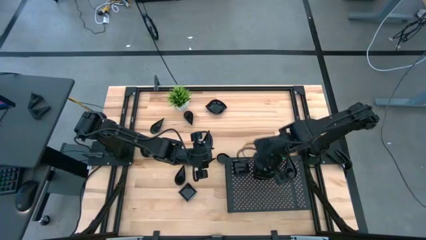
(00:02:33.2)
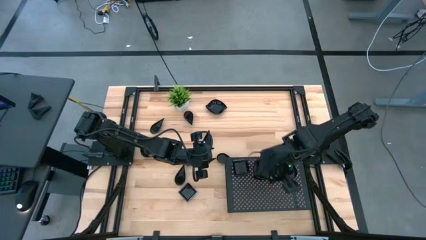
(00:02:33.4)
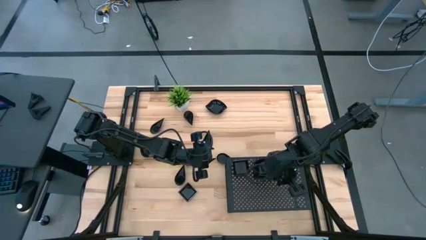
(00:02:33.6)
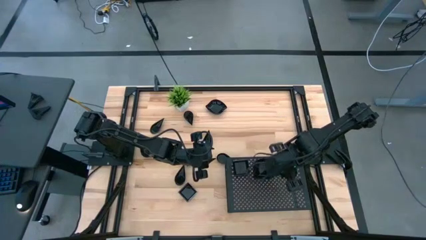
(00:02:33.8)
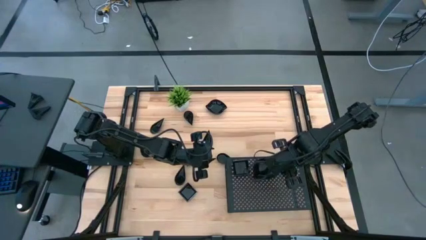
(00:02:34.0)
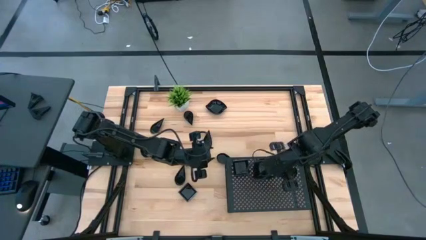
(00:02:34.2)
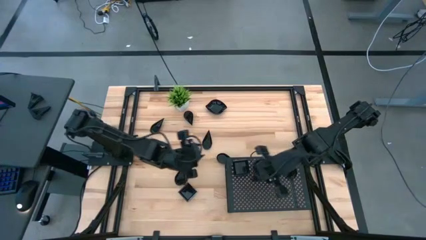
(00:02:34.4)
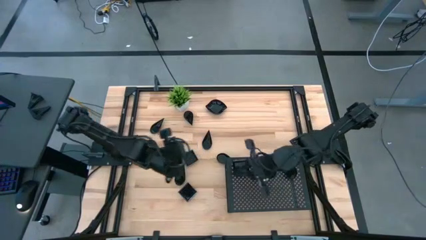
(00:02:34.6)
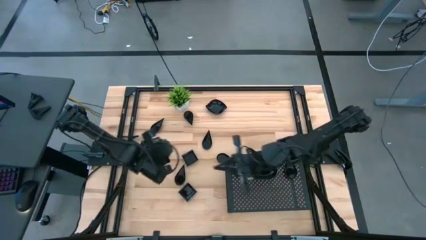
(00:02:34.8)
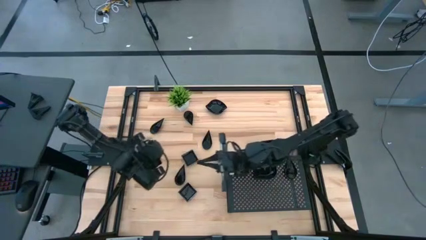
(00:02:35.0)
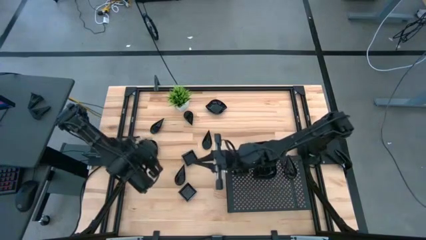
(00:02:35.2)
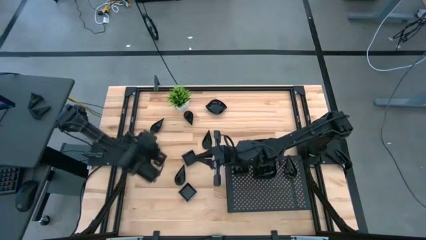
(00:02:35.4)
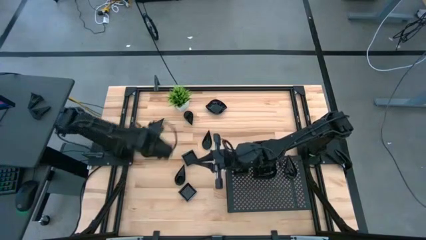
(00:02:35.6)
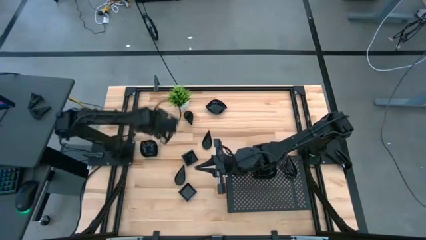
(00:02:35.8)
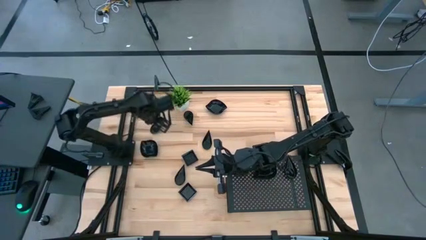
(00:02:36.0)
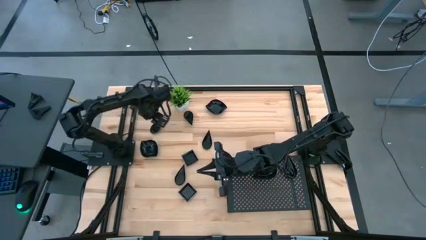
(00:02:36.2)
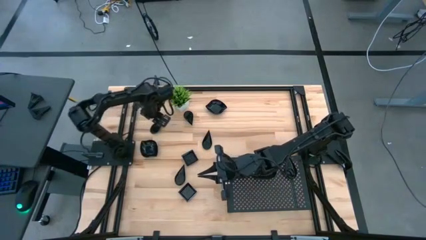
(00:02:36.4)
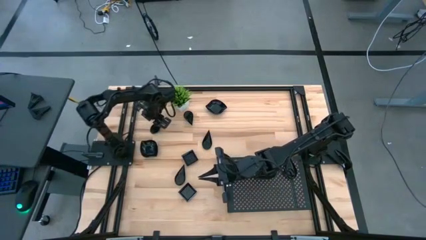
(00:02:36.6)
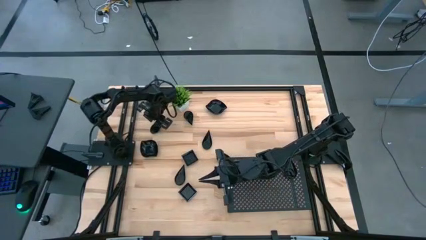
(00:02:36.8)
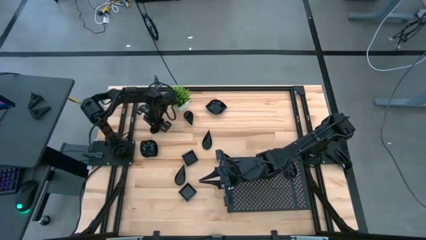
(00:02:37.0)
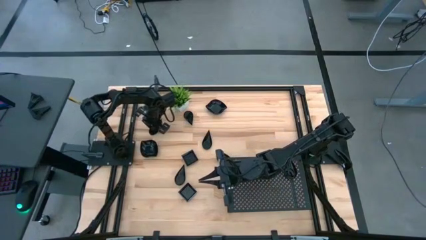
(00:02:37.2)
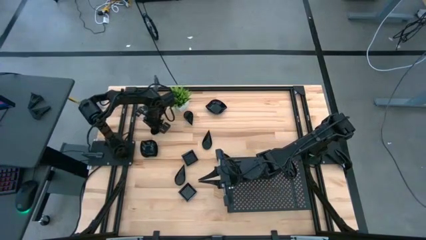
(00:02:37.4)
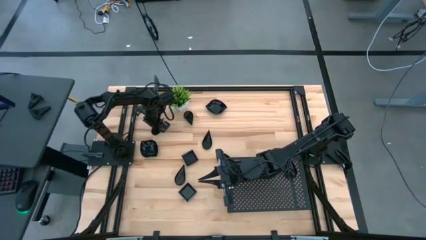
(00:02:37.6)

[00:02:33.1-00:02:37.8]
Task: Pick & Place Mini shaped plates
Stack the drop shaped plate on top of the drop shaped plate on the shelf

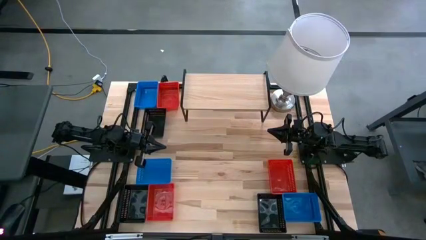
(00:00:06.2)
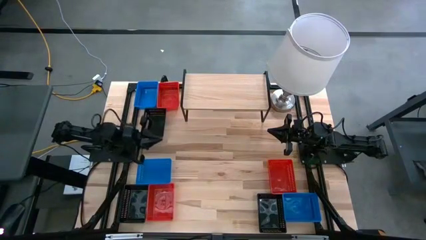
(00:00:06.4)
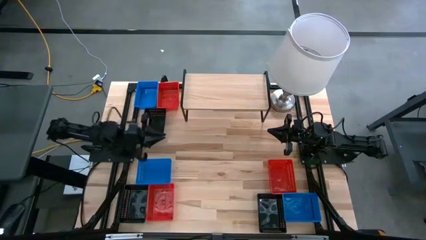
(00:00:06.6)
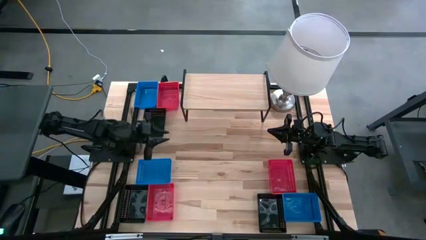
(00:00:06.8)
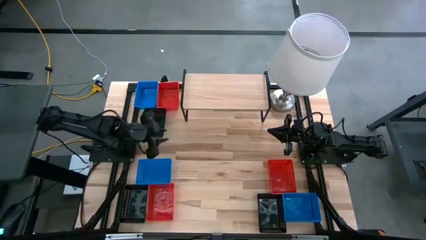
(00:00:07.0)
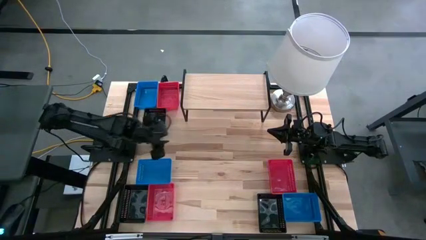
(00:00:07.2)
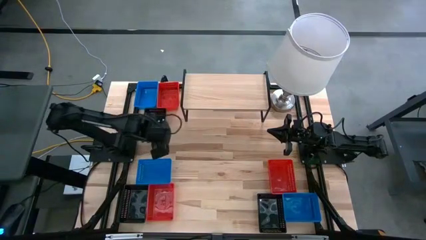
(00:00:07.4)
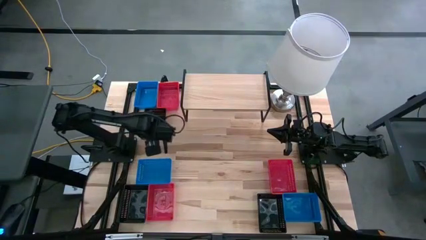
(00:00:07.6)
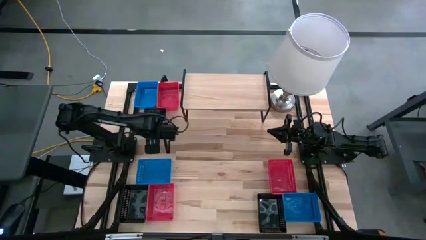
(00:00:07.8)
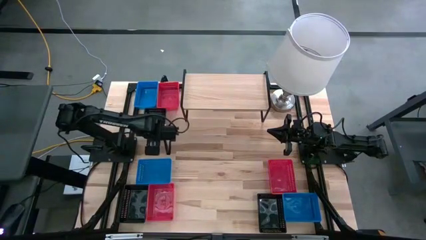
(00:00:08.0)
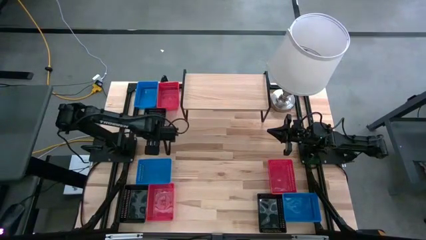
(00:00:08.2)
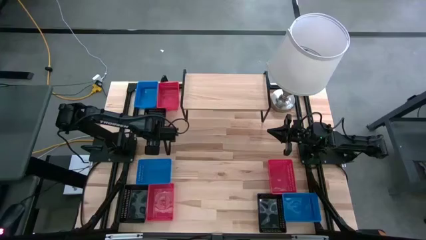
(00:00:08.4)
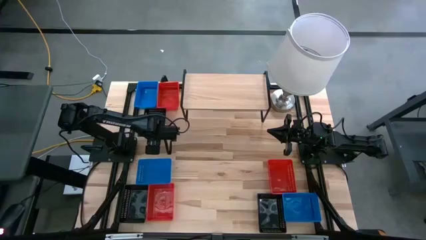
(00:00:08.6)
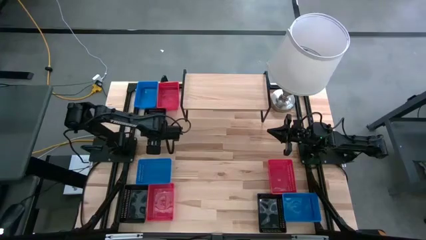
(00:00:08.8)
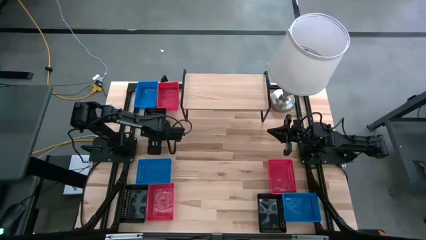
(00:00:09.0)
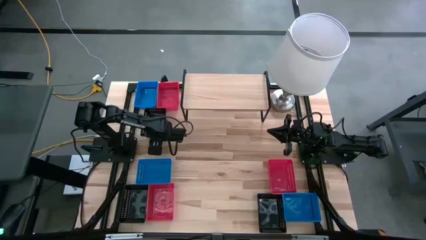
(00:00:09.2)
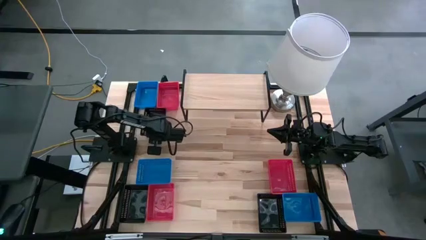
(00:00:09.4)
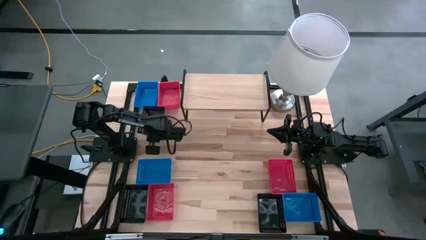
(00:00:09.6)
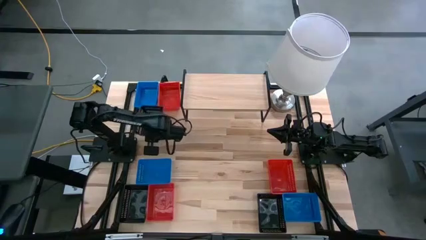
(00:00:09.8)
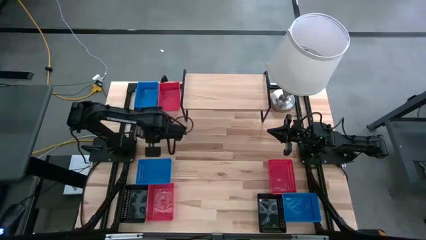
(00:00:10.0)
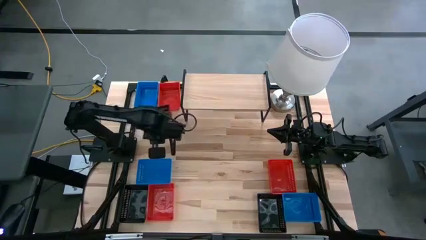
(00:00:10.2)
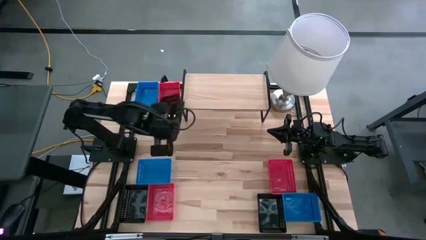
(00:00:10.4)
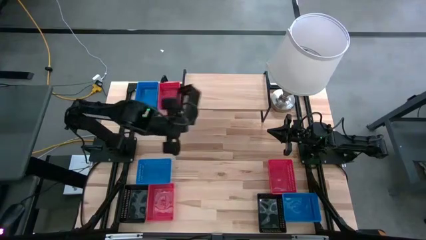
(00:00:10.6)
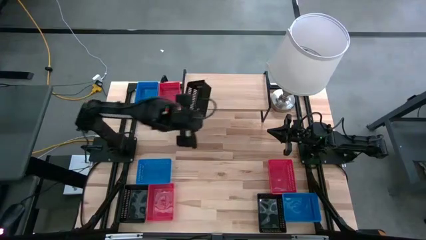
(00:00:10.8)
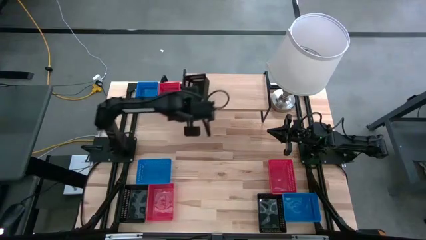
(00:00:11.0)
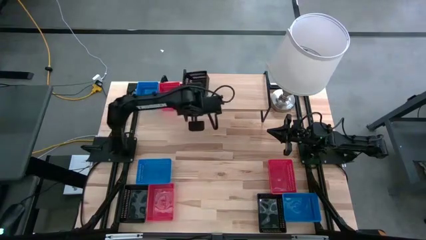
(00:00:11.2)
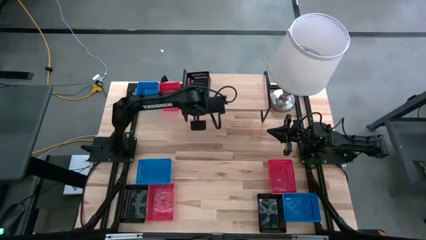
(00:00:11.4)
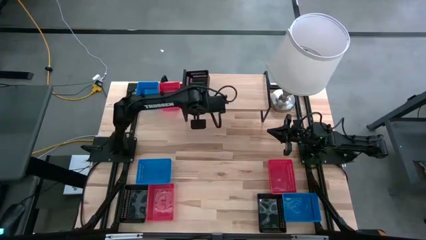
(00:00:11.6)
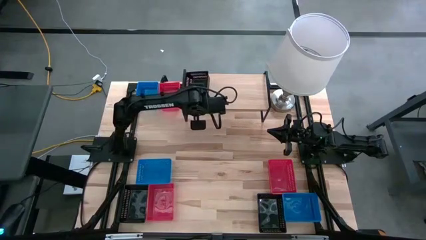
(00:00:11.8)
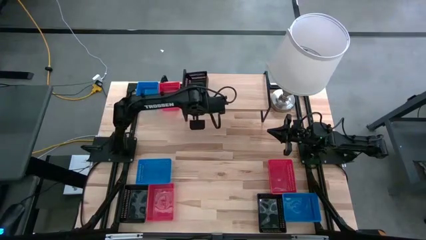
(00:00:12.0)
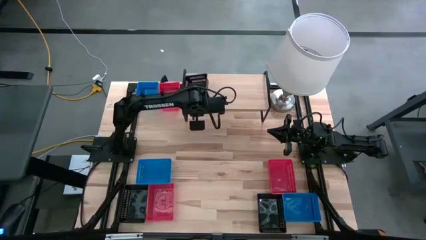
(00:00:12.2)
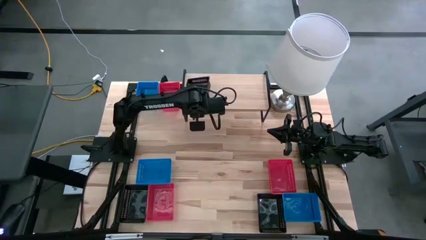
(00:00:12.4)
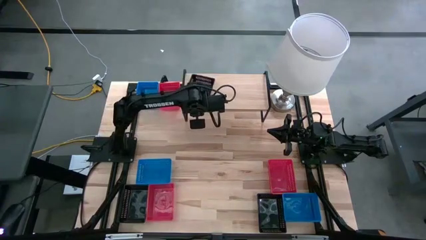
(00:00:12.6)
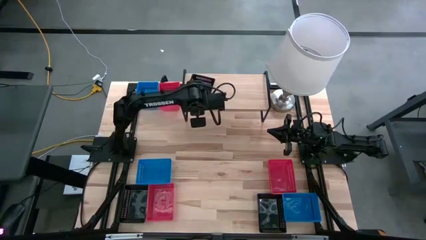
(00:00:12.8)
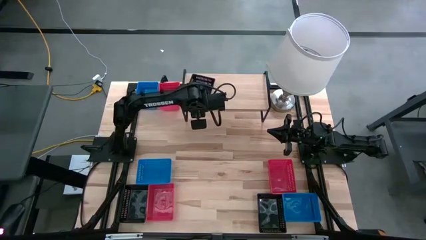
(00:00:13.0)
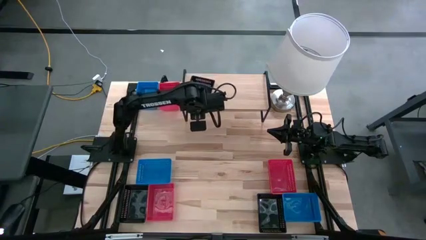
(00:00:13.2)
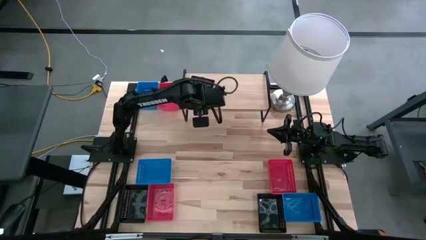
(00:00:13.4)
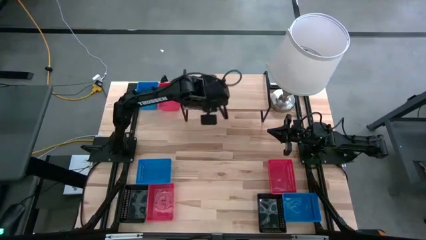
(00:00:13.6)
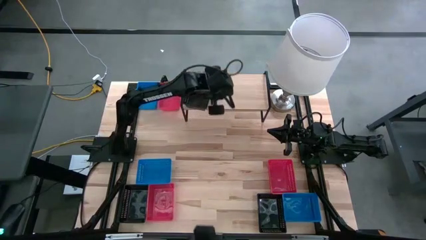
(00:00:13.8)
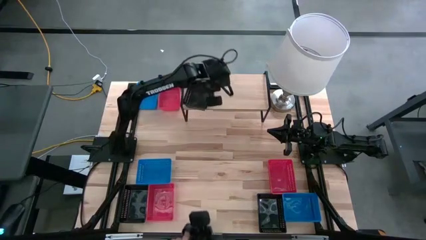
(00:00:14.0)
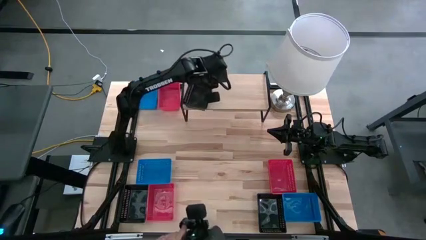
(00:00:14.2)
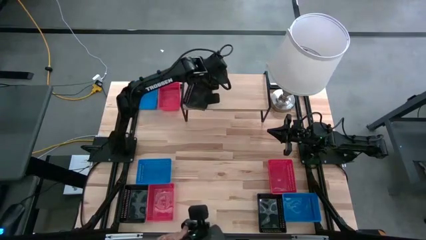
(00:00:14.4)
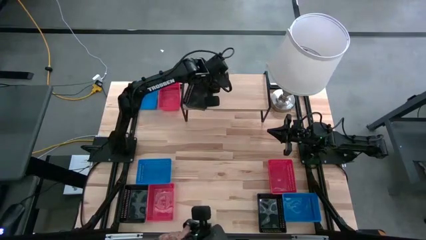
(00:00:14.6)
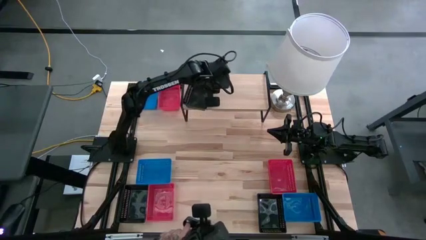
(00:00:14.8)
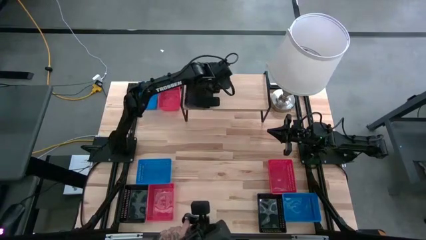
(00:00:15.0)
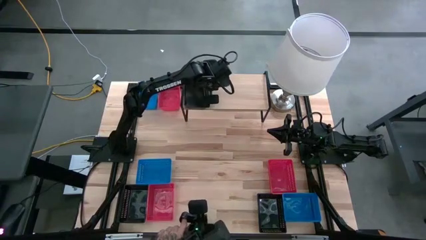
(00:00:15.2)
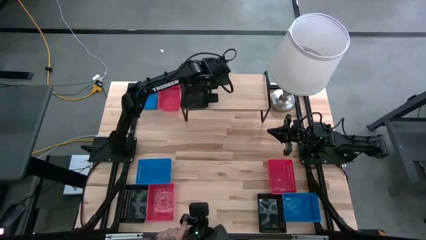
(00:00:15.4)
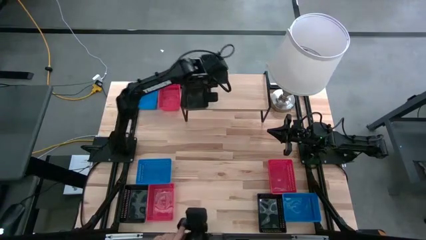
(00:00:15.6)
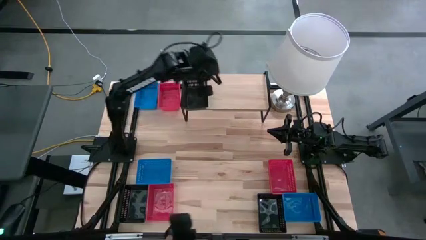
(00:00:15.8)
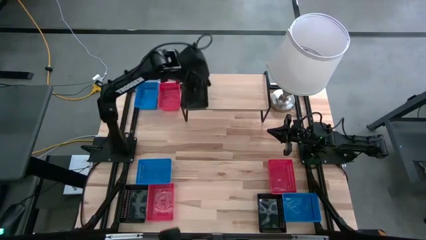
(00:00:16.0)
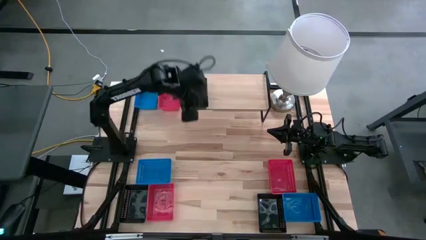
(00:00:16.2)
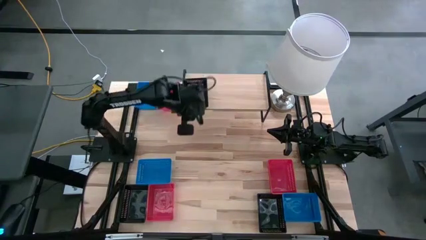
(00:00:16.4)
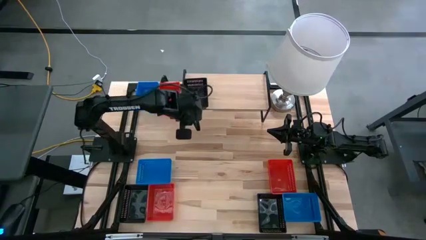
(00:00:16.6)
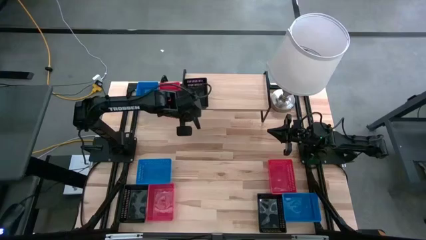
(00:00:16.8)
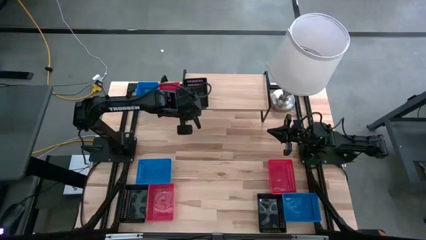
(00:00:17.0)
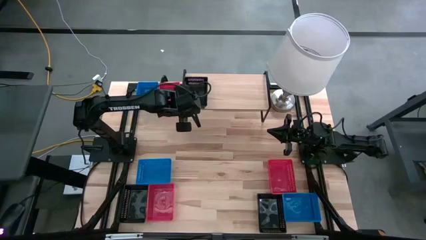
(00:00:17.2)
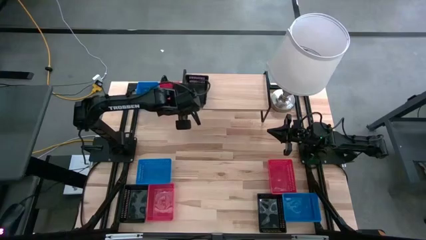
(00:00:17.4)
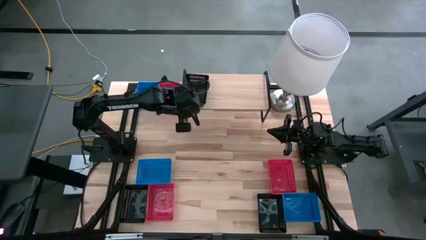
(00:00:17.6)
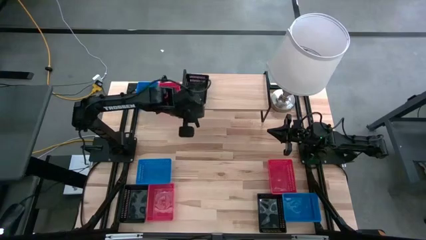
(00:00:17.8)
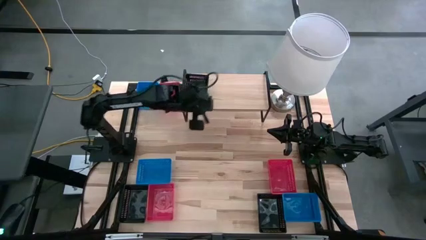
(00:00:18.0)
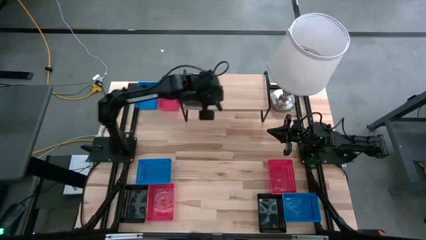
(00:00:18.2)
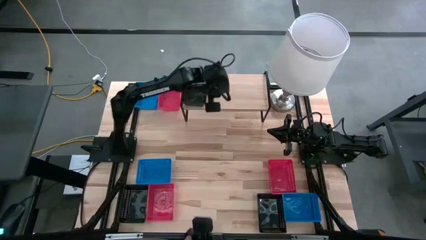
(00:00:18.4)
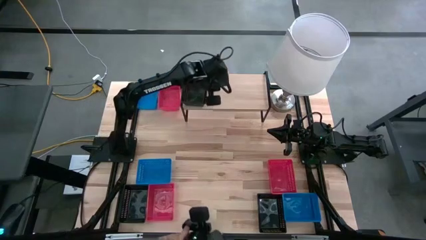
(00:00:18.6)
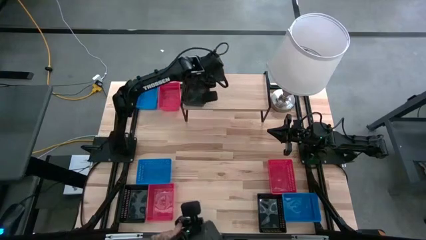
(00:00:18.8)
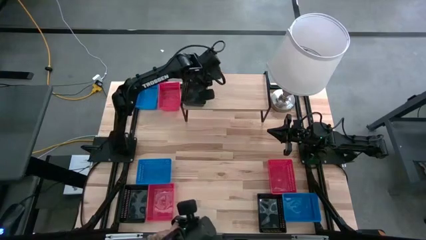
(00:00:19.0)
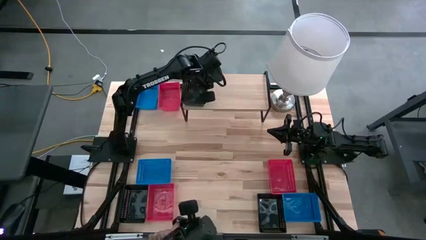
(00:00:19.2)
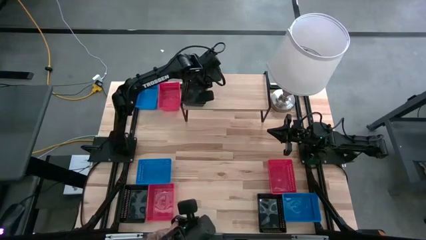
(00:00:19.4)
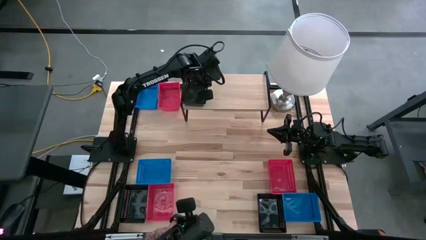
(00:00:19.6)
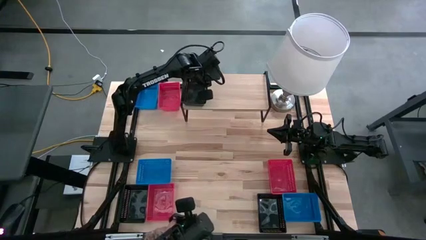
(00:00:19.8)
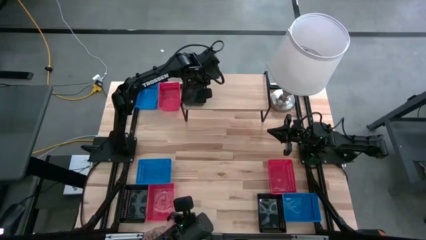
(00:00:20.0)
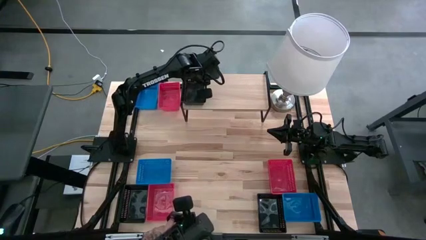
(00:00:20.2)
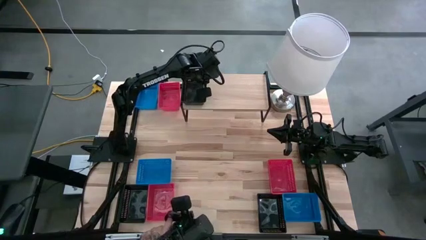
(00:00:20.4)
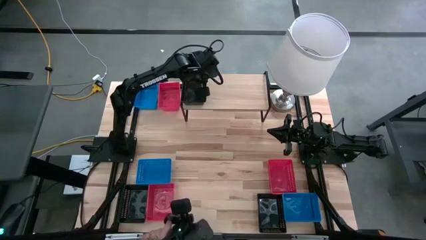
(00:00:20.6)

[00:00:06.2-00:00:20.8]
Task: Stack baskets on shelf by color
Put the top left black bin on the shelf
